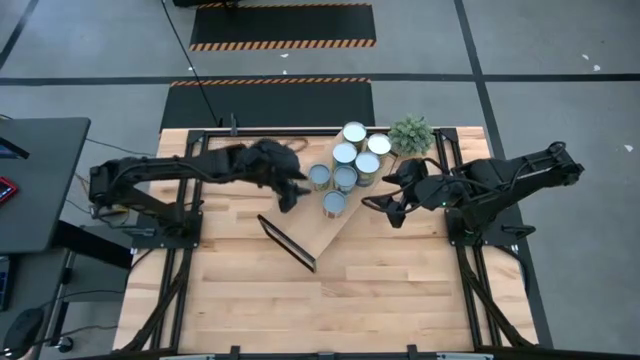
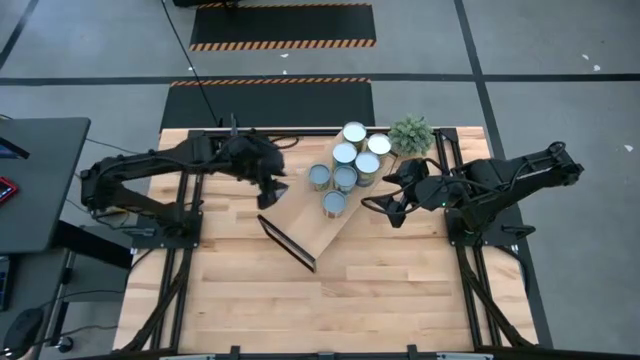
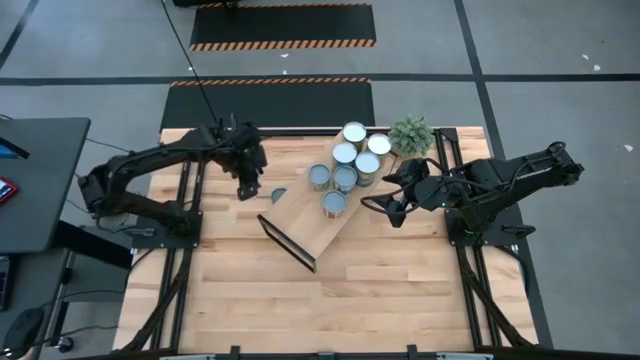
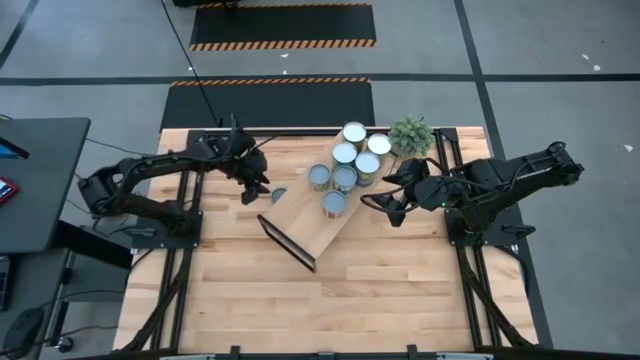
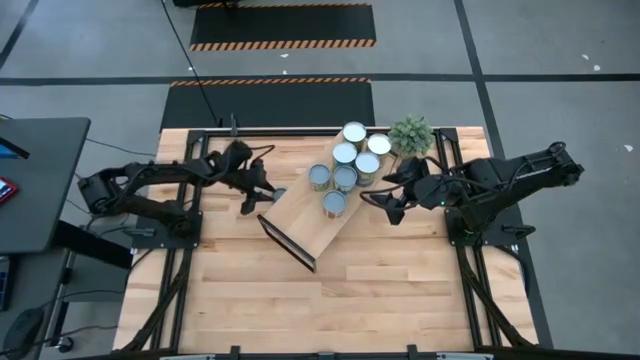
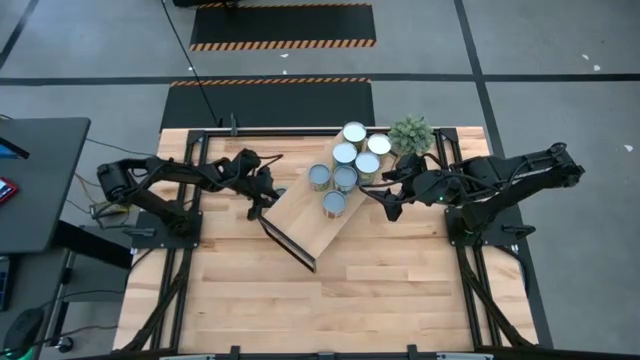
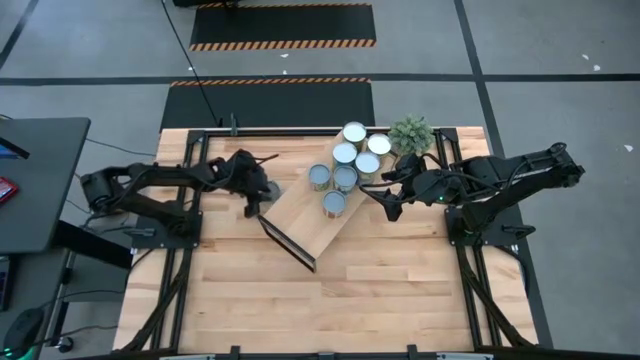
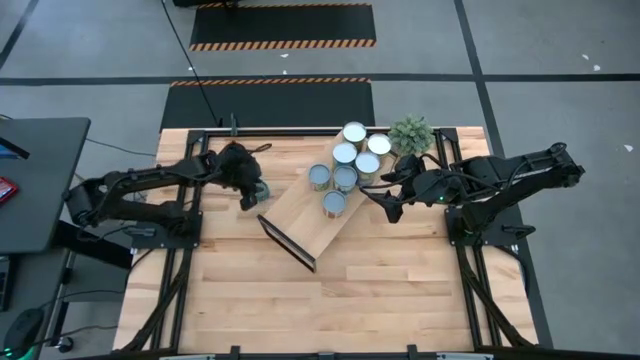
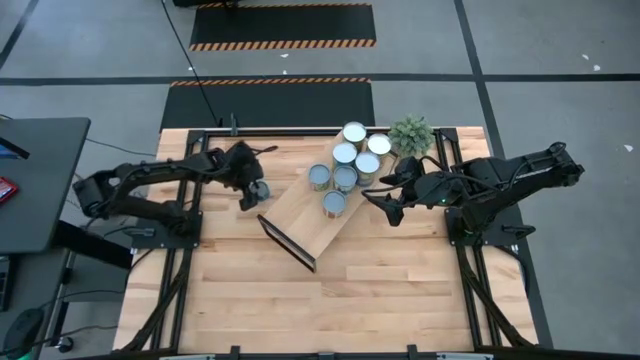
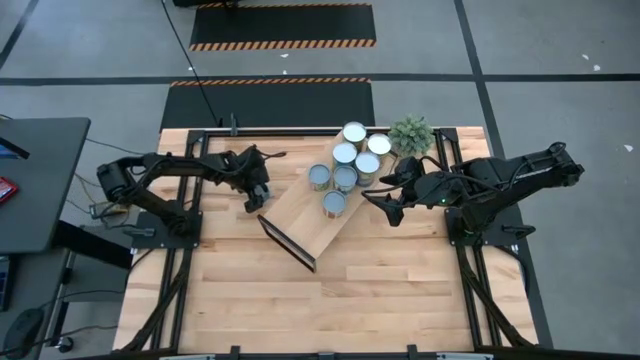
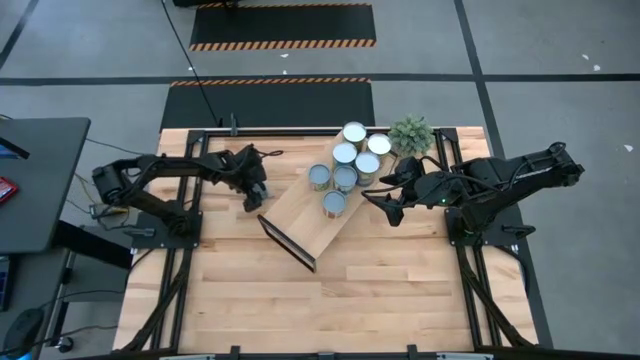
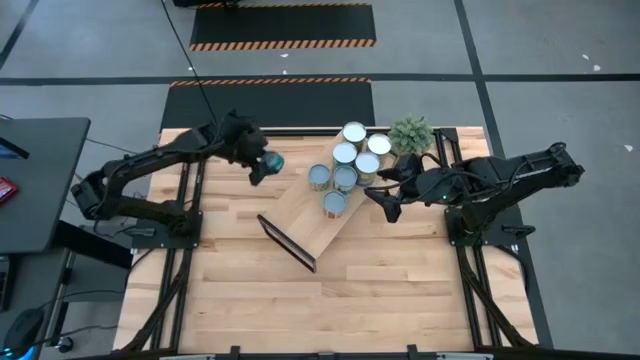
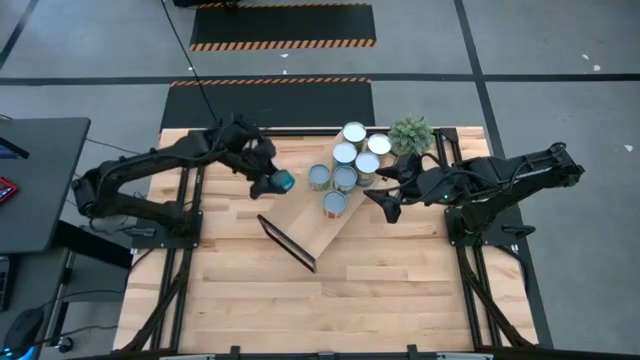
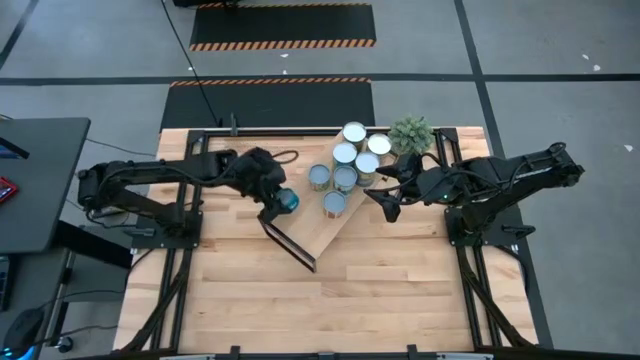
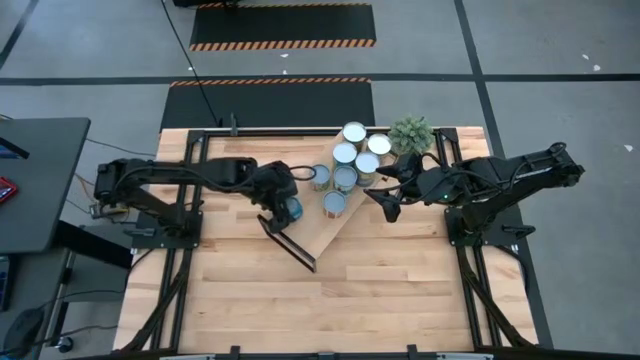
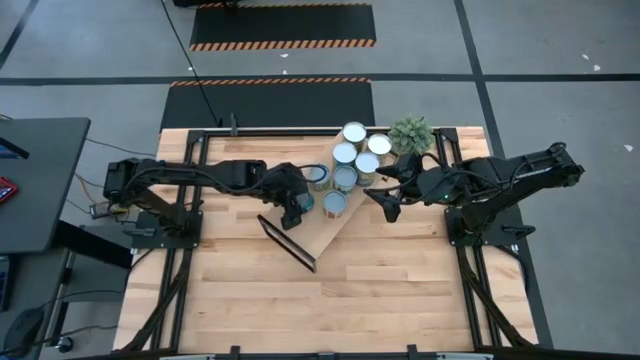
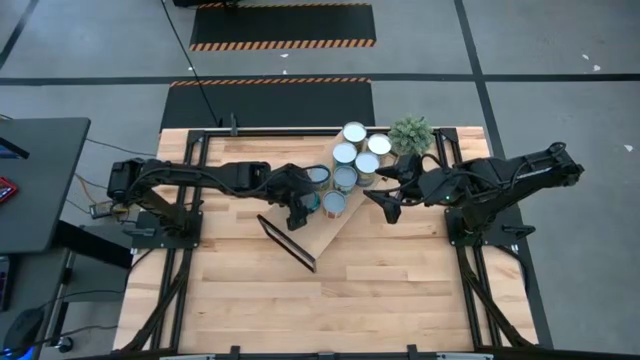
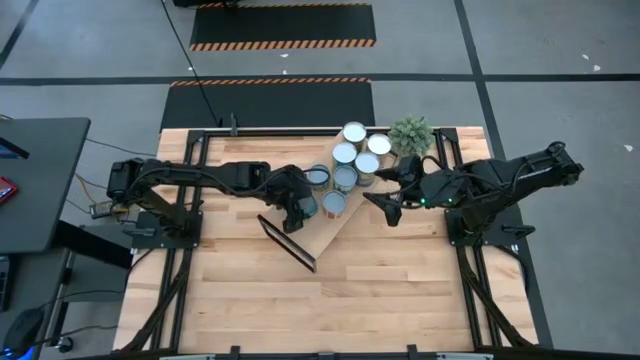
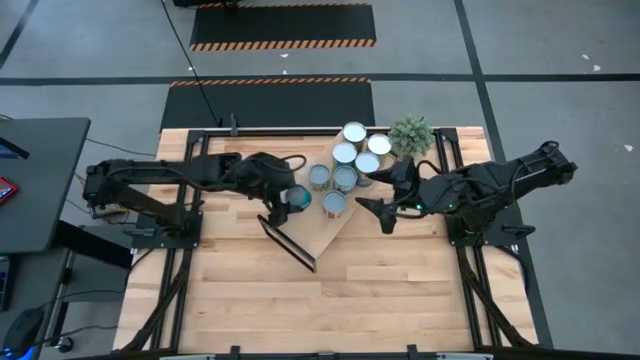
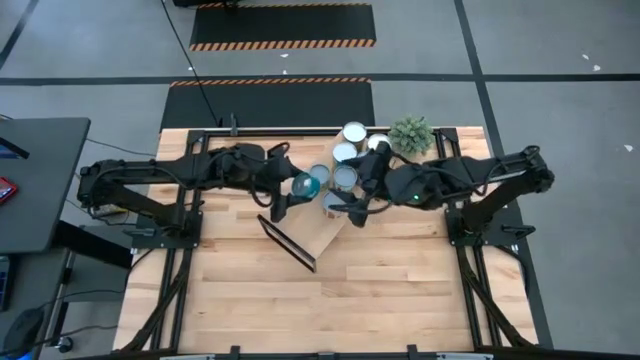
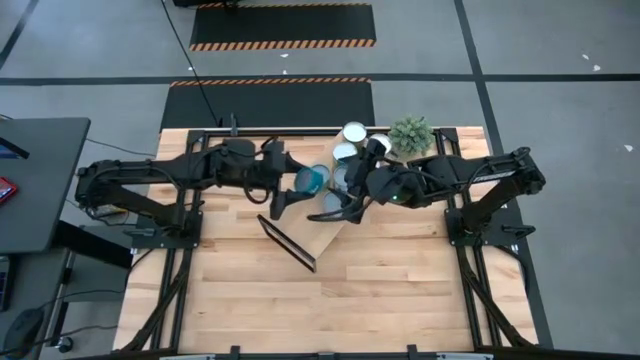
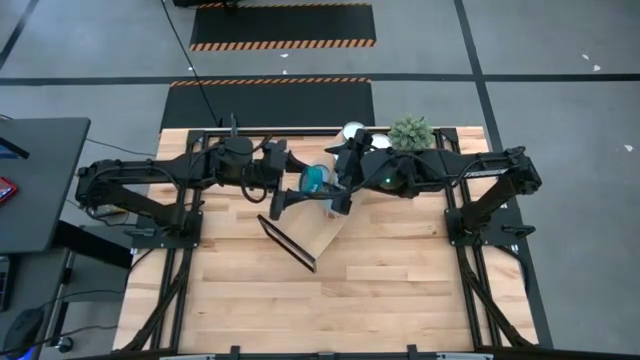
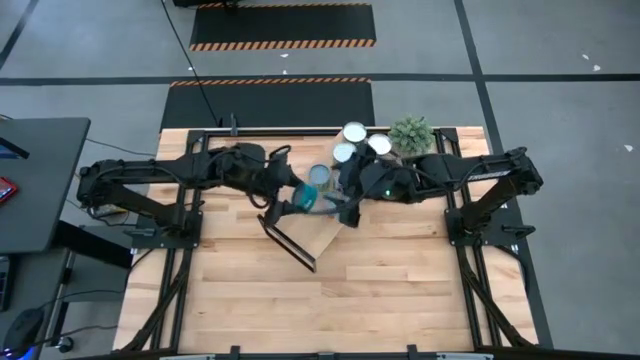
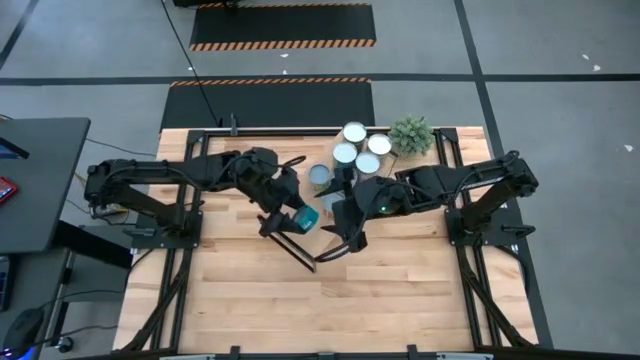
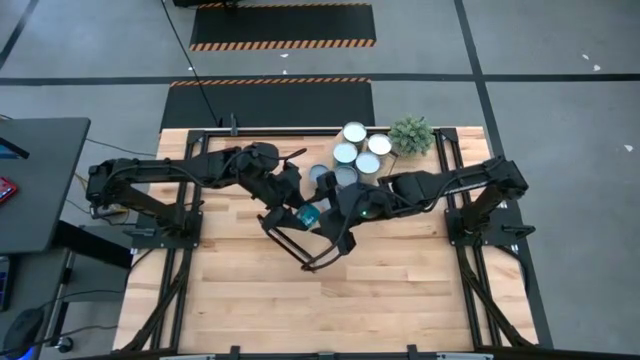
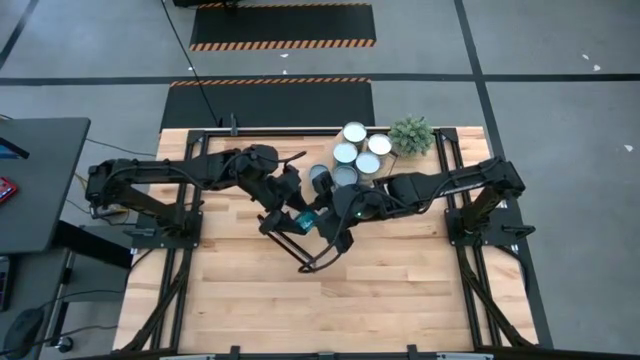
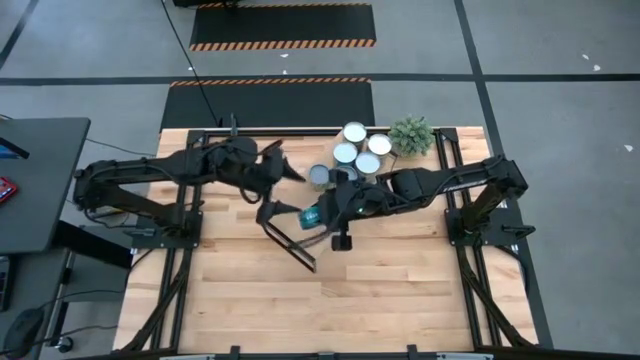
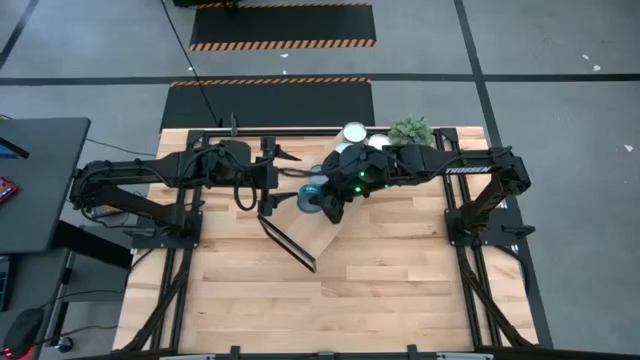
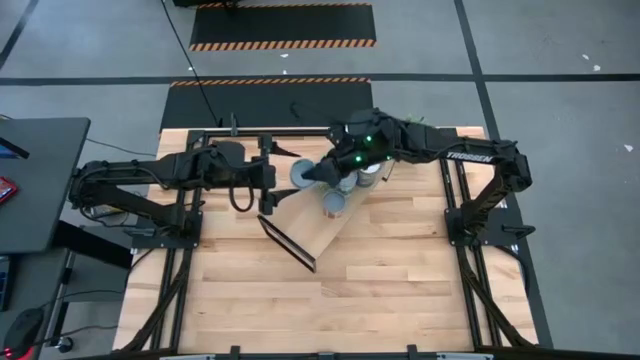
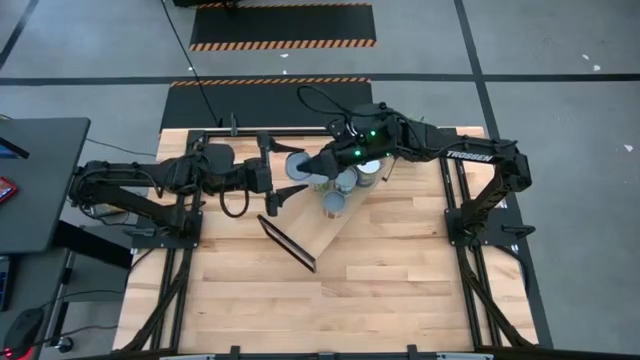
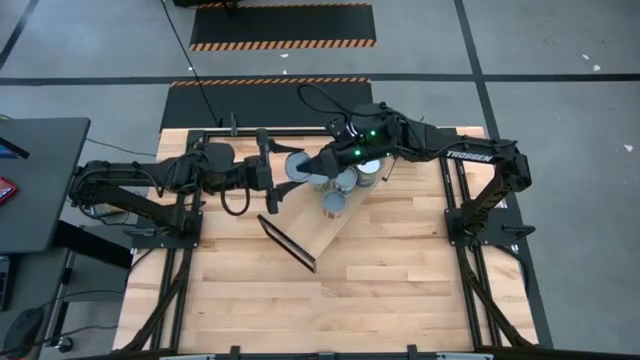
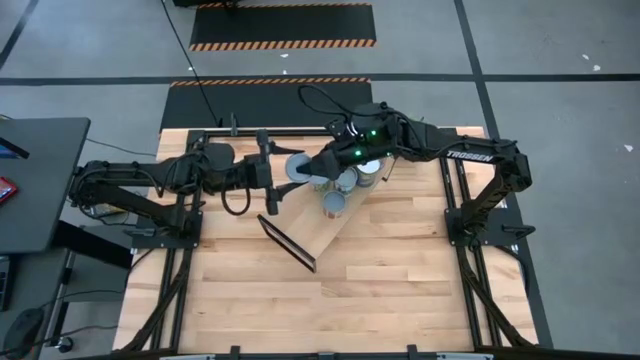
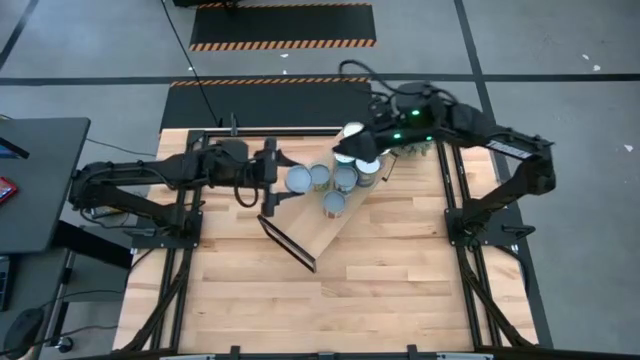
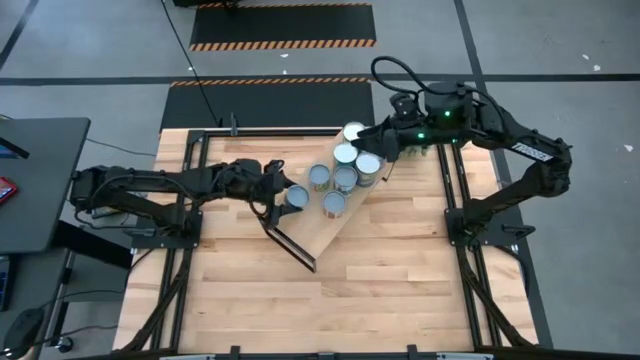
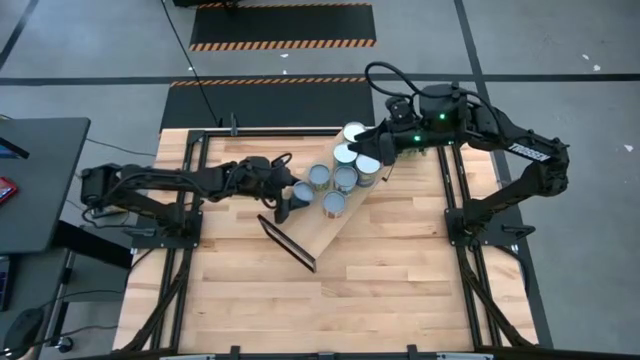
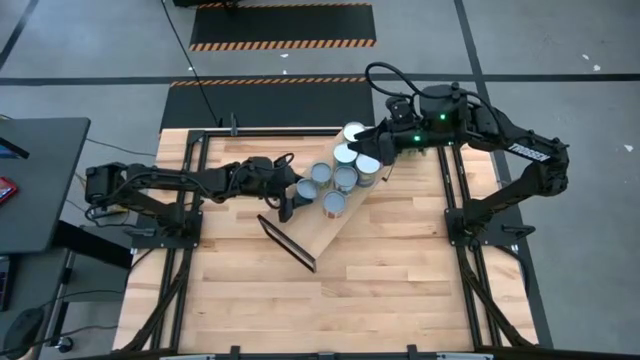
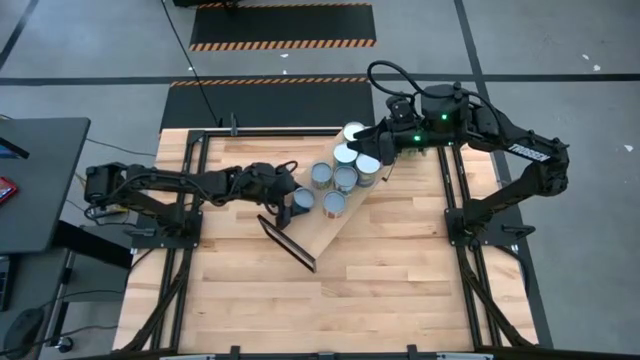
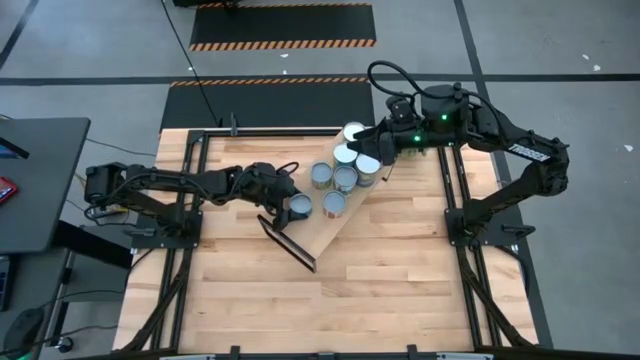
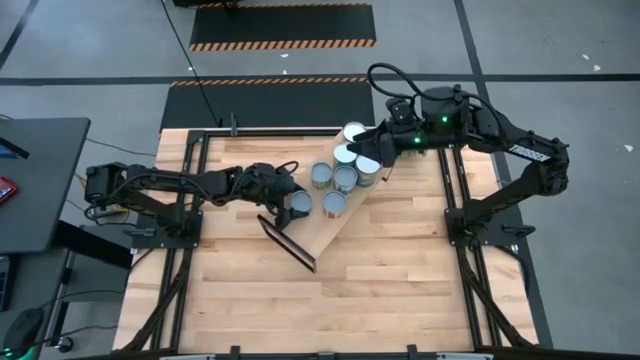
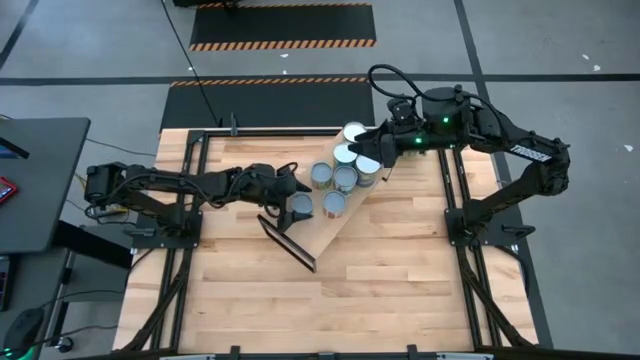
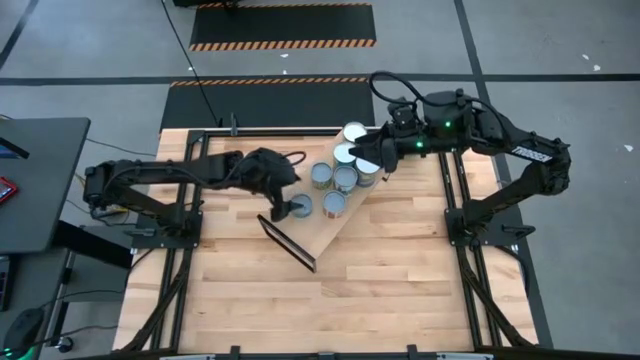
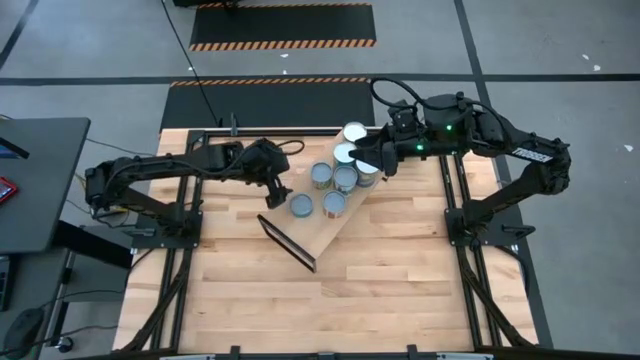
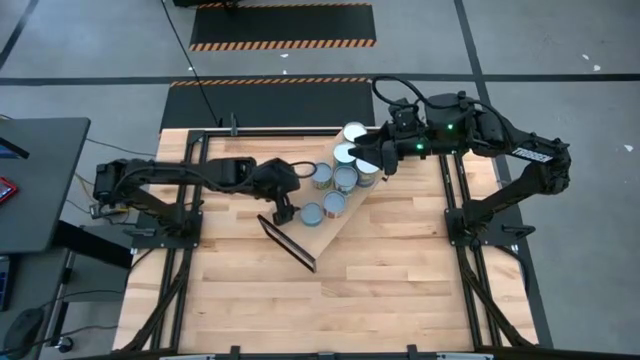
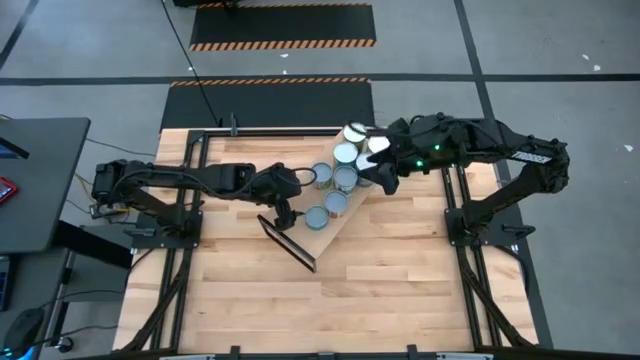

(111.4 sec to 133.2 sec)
Task: Pick and place cans onto a shelf
Put the canned tuna on the shelf
